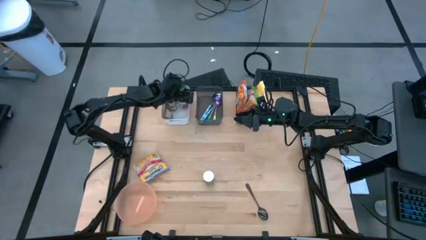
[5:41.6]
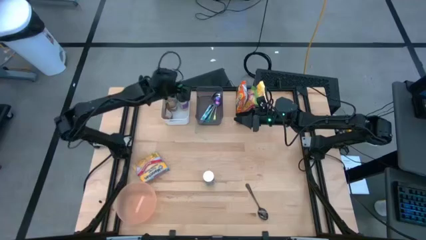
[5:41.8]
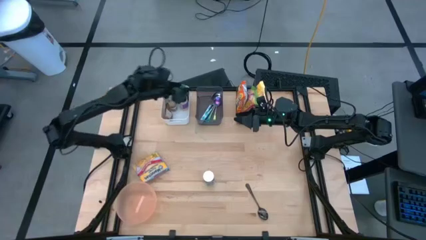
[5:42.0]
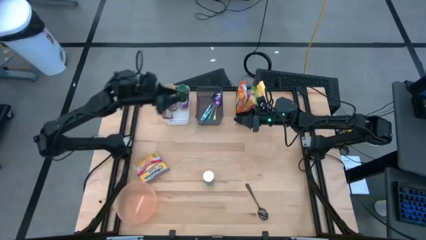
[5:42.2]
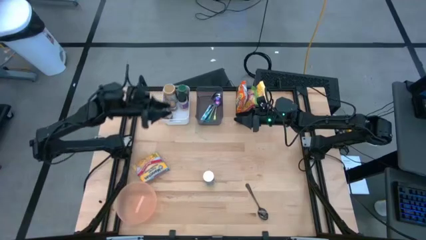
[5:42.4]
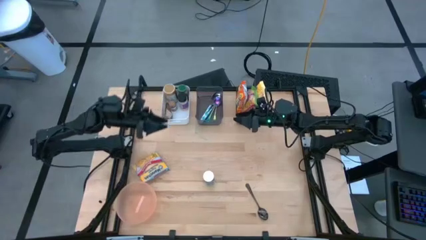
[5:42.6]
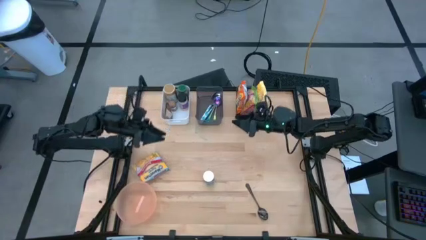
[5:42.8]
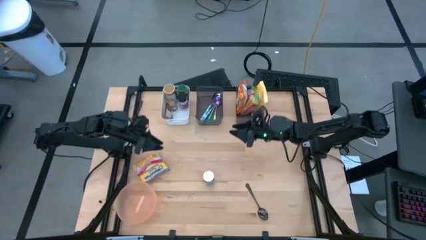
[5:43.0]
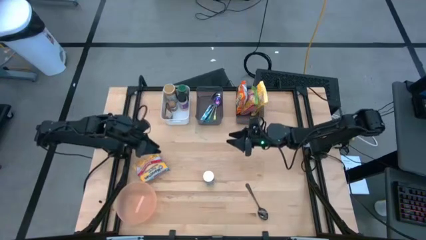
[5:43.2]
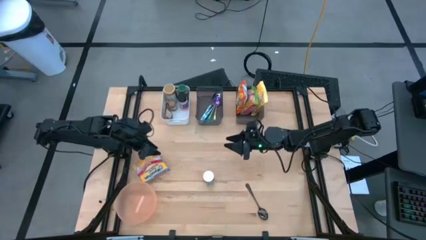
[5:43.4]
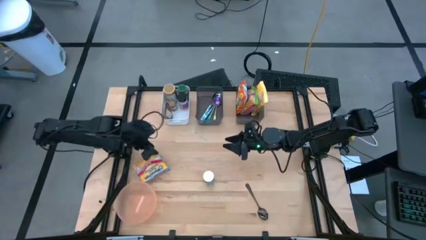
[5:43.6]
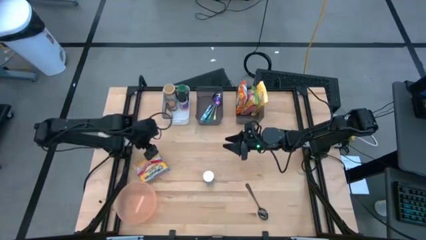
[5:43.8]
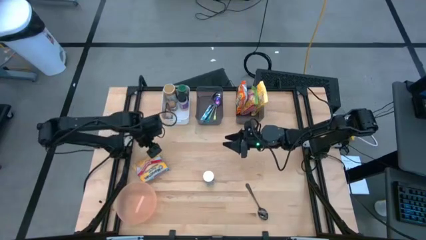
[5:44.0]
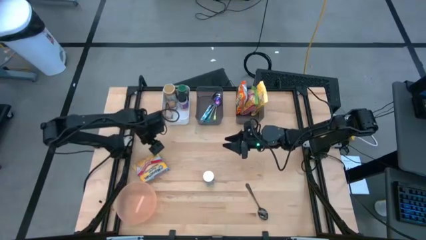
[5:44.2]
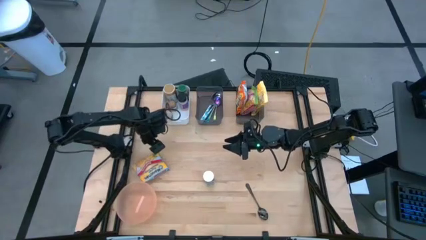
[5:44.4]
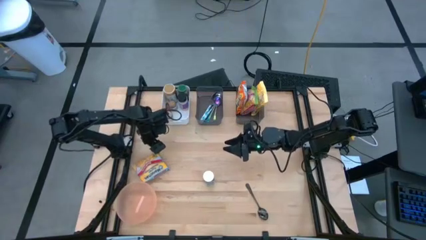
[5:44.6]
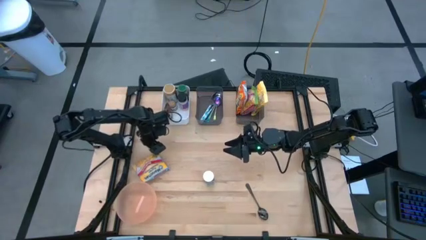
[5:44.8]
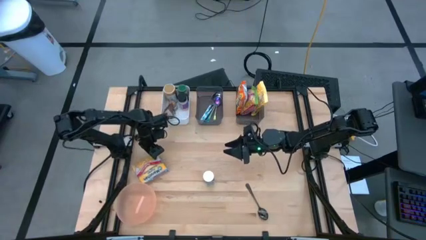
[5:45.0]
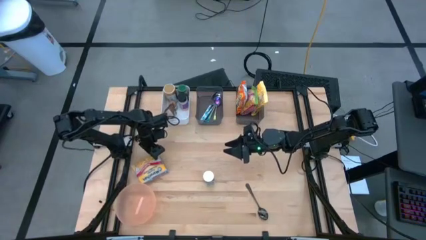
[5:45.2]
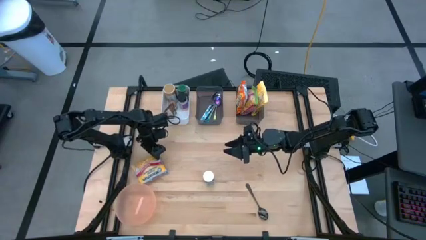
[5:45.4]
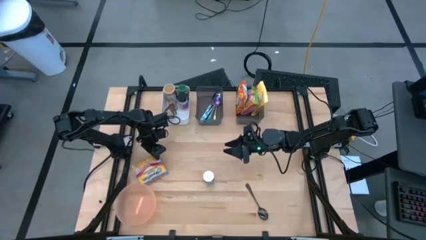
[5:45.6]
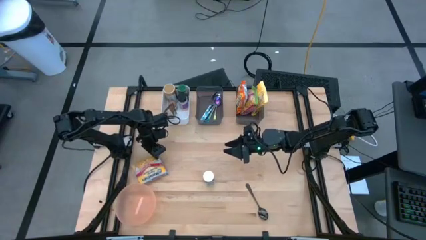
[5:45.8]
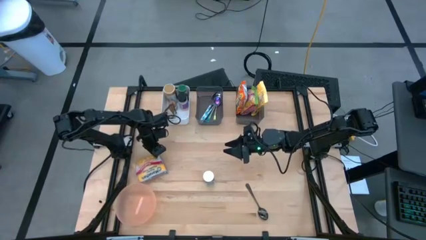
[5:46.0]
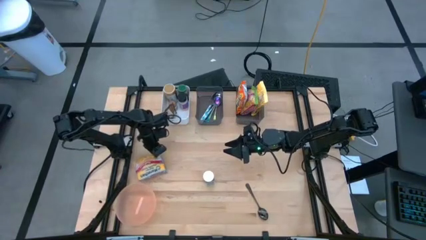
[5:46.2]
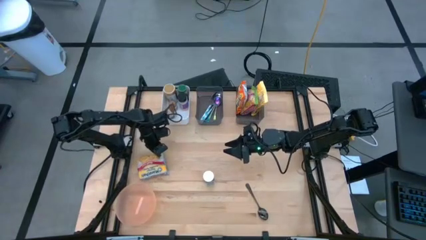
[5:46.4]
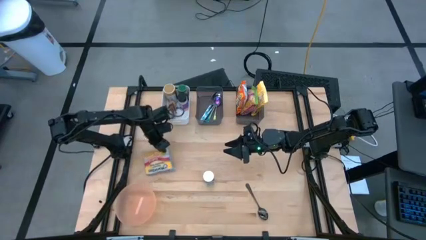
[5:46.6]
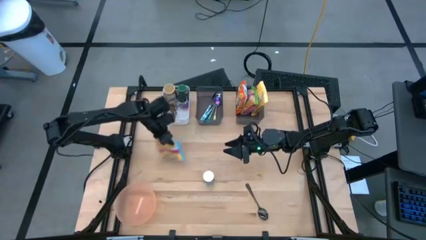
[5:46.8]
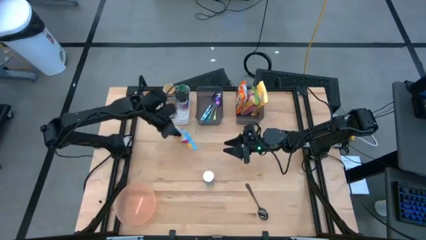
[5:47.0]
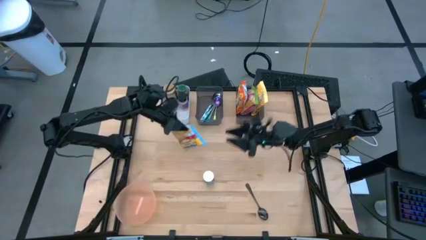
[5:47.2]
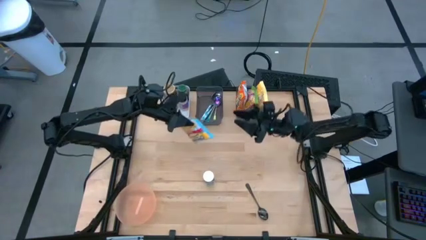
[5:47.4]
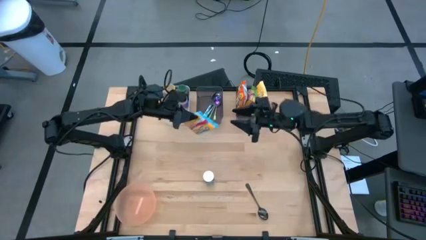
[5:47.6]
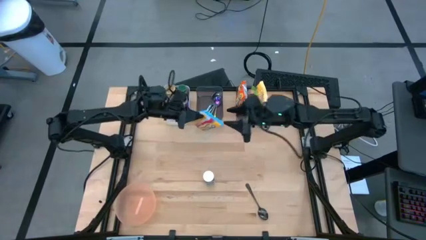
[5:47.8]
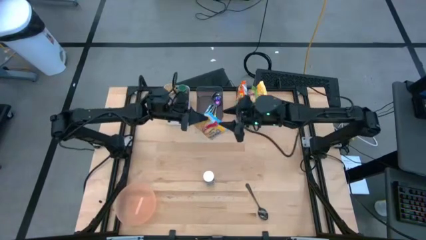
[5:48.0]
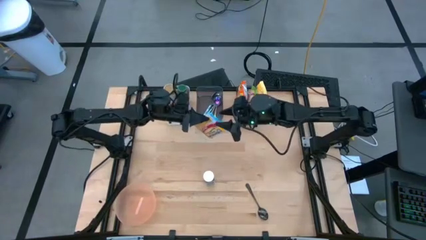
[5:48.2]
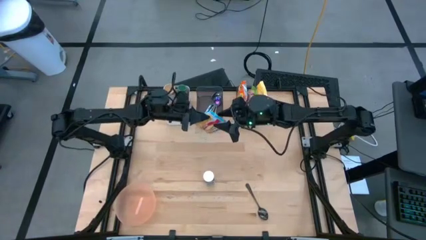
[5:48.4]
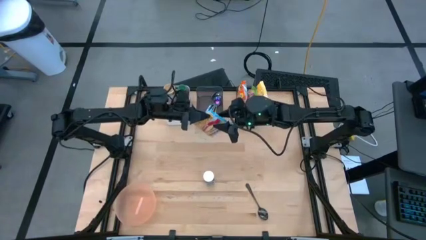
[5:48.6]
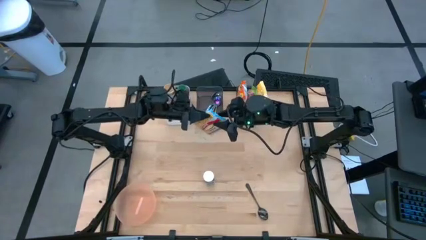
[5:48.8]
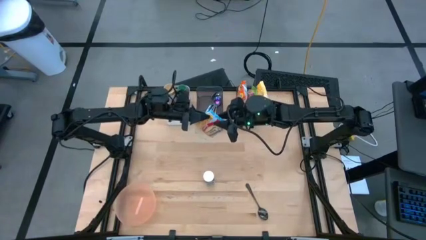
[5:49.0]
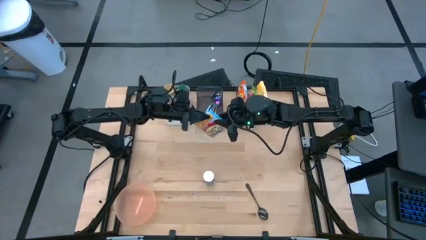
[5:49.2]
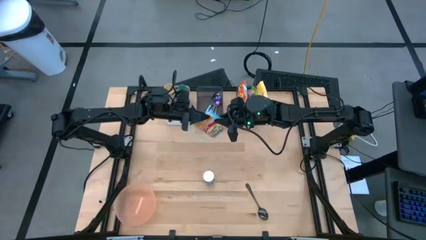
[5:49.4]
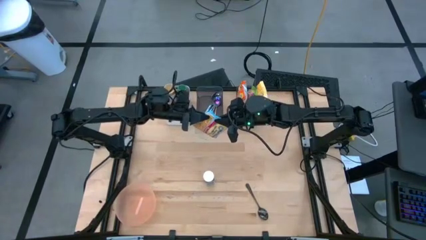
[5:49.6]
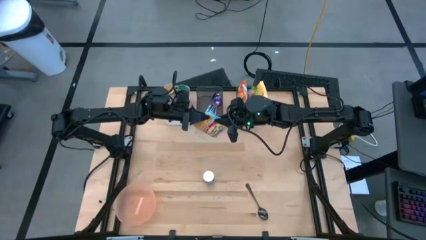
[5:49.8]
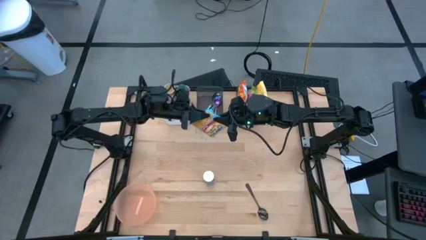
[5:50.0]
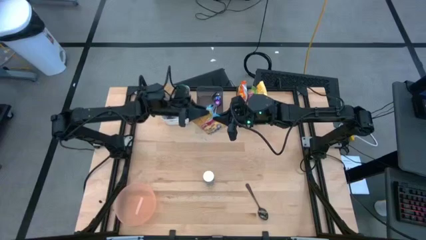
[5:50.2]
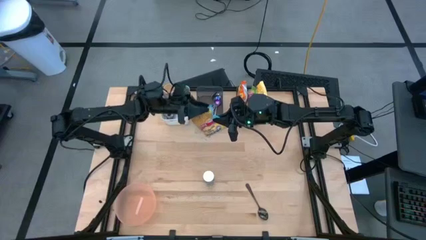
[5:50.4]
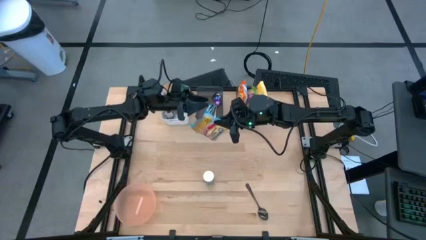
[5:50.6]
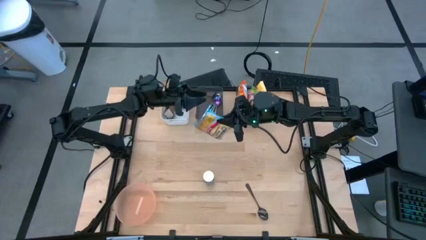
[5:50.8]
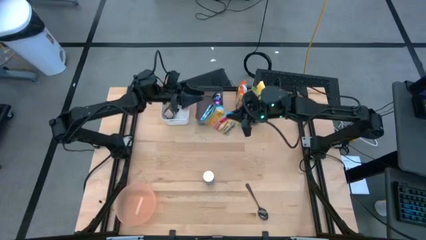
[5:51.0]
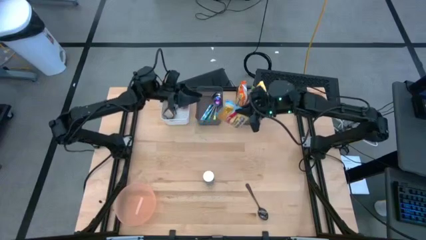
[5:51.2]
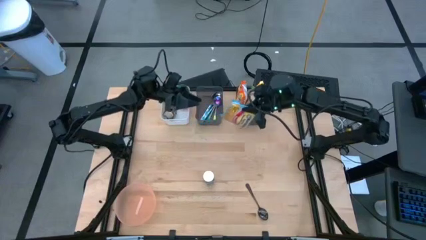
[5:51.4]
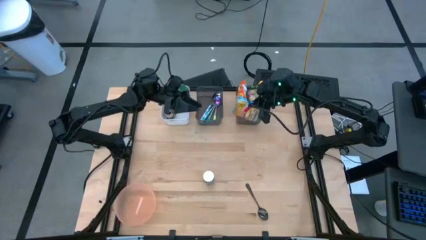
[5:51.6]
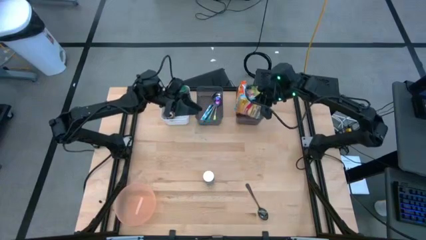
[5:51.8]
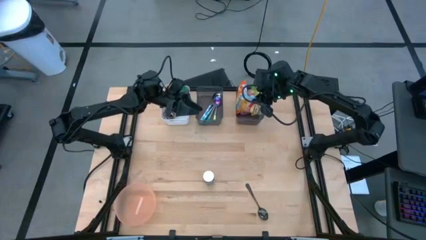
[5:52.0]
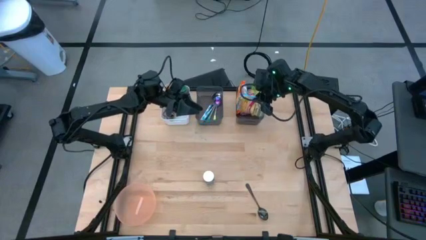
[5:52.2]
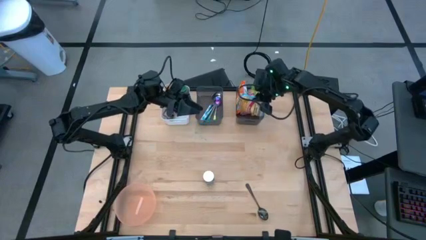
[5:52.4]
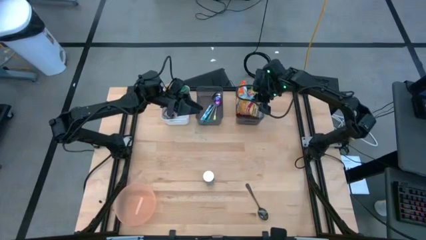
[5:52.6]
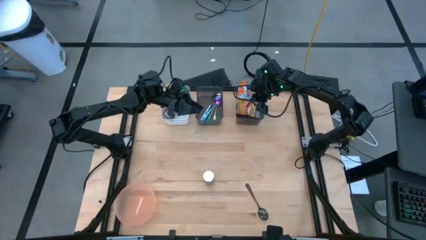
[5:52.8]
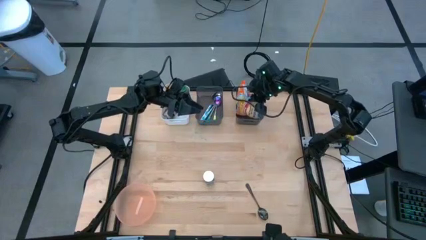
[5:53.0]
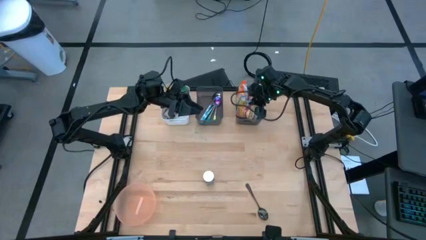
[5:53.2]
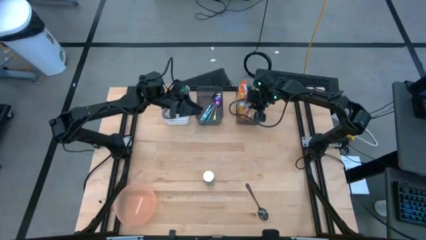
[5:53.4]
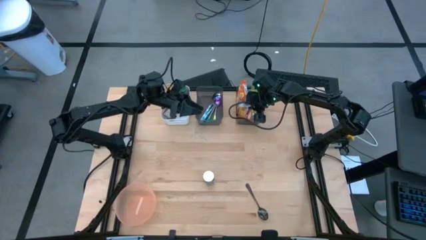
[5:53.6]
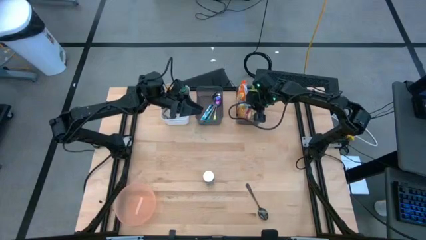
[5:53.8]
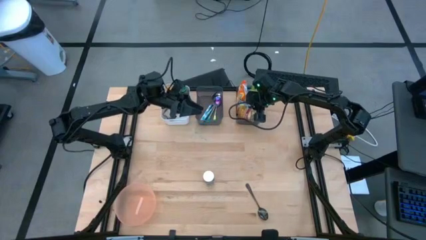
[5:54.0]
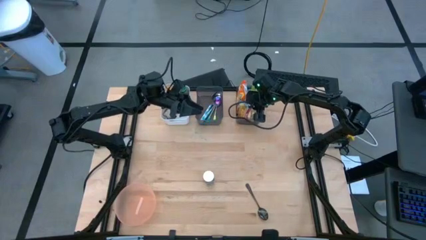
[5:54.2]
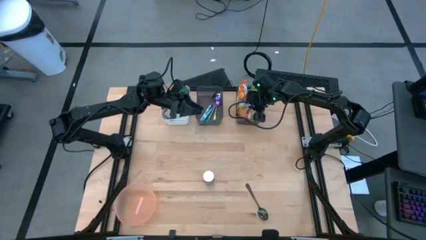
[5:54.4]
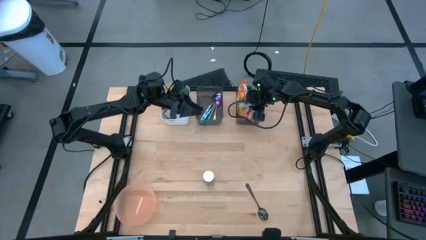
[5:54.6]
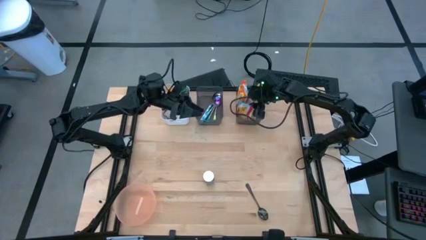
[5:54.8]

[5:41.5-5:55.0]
Task: Pick & Place Food Item
Put the blue noodle pack into the right black bin

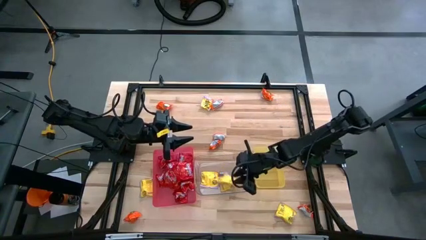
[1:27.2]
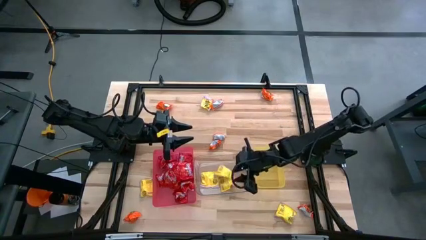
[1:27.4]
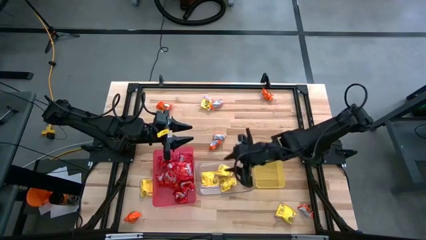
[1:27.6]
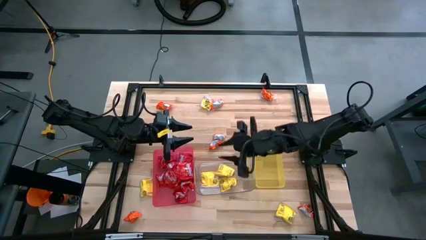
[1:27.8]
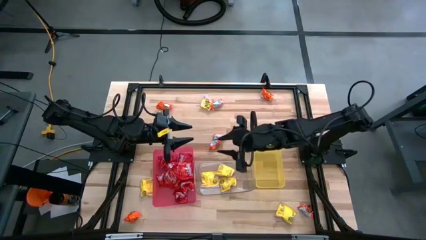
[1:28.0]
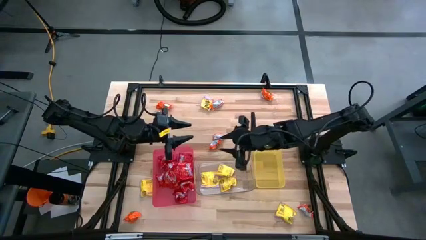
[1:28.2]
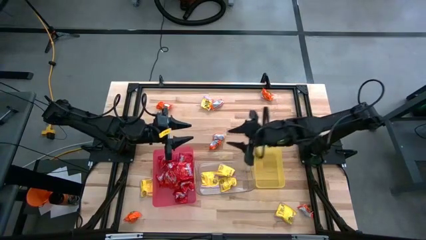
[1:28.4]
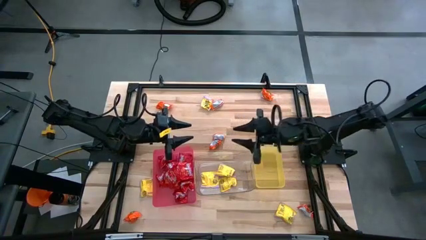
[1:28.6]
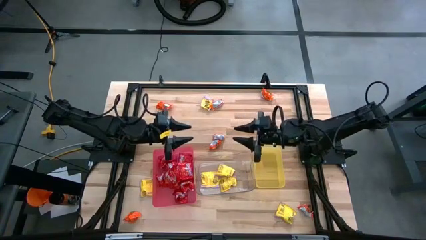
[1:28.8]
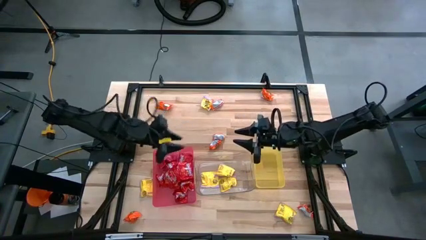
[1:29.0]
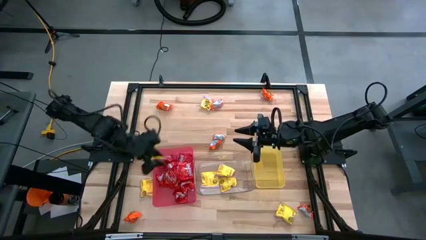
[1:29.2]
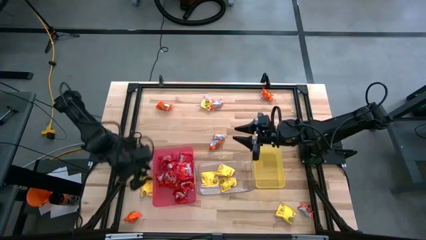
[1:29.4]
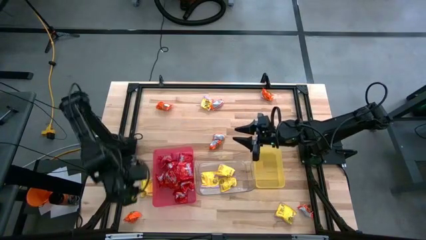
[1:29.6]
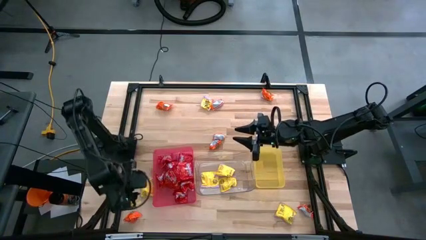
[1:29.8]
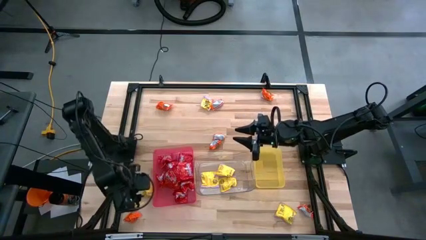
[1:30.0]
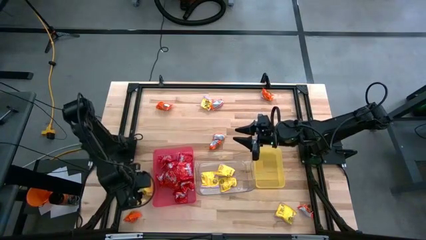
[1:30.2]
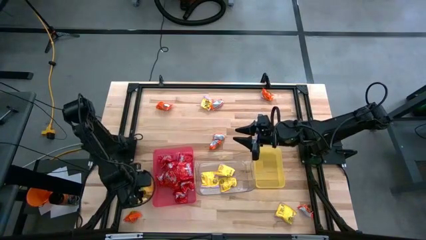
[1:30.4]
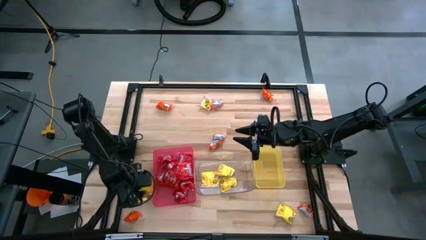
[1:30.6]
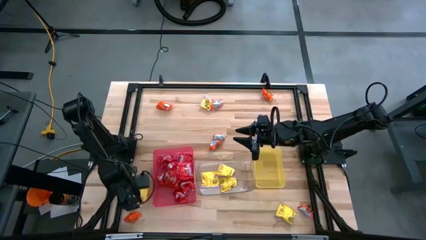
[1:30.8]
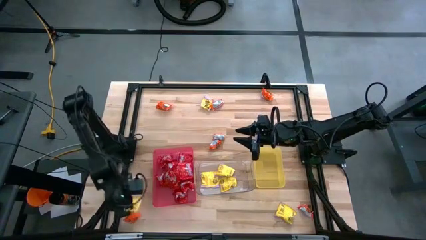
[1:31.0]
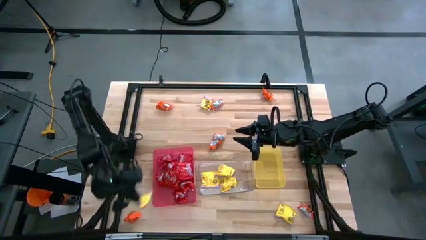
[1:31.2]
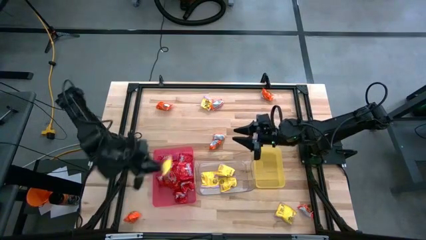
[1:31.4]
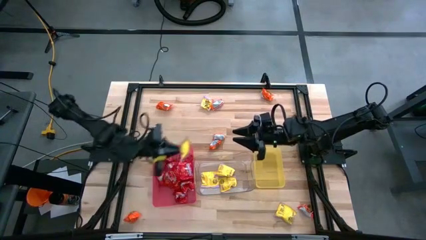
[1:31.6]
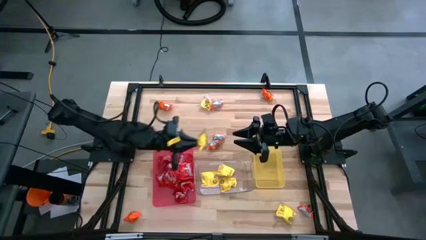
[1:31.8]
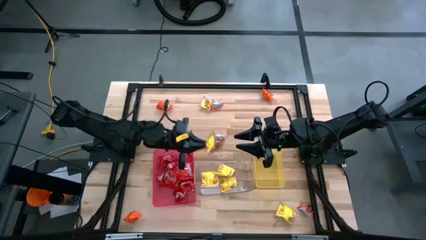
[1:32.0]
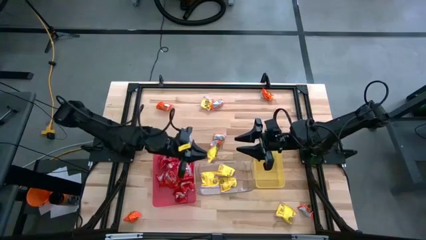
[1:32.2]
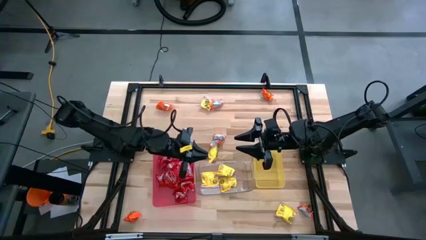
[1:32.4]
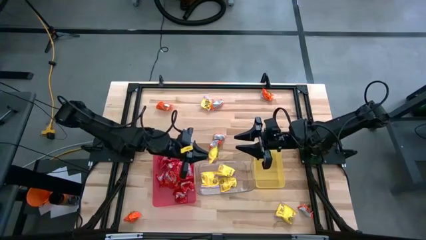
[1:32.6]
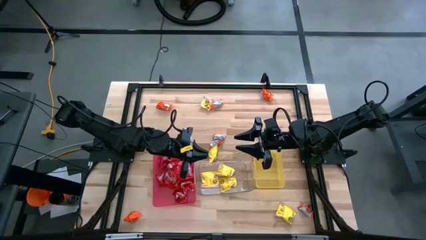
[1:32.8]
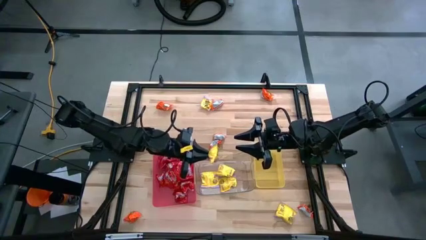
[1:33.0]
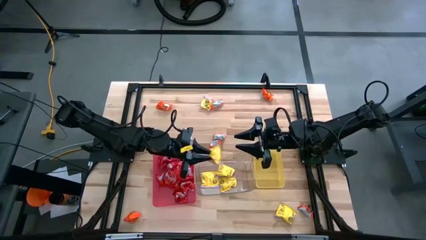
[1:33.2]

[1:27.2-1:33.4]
Task: Sort candy
Put the yellow candy into the transparent bin
